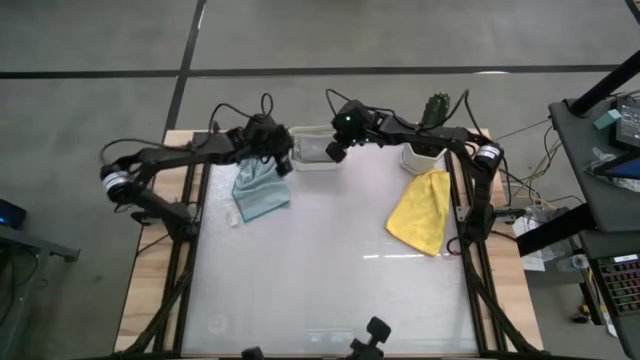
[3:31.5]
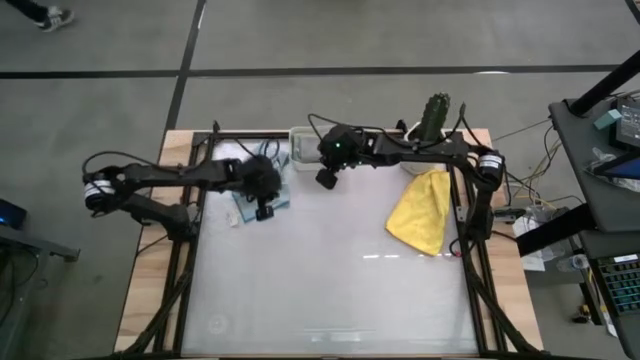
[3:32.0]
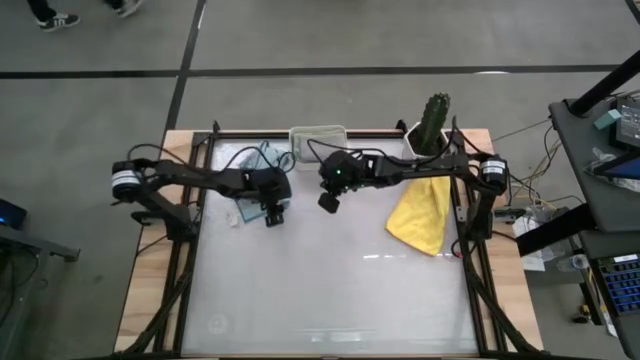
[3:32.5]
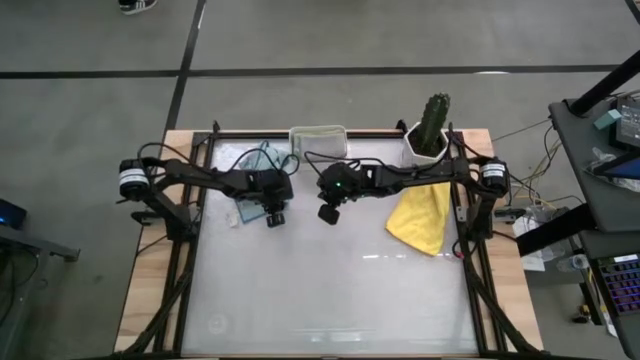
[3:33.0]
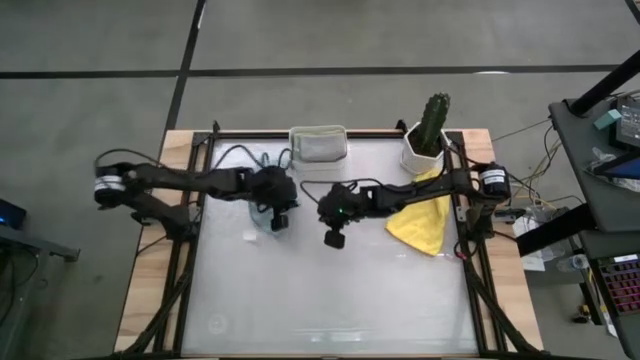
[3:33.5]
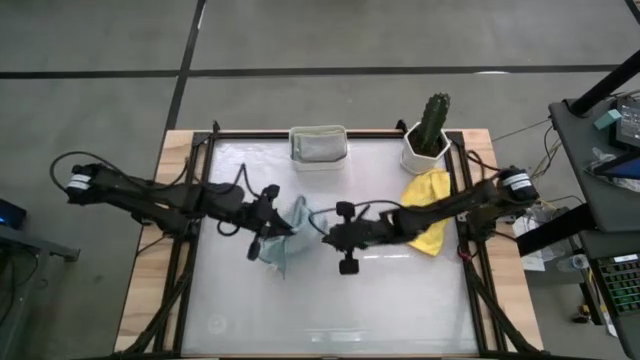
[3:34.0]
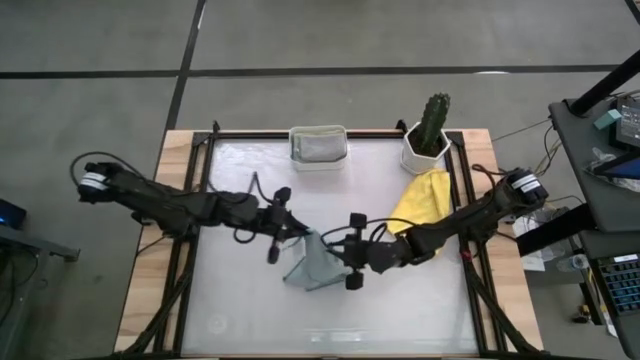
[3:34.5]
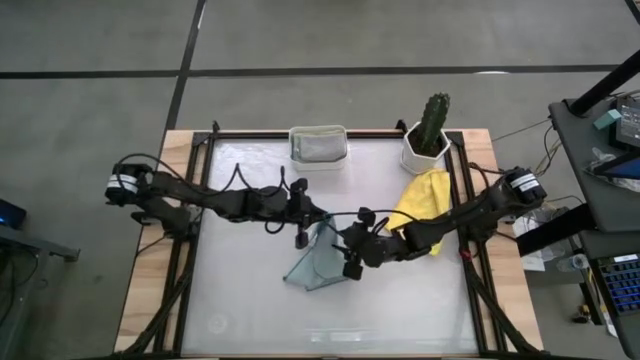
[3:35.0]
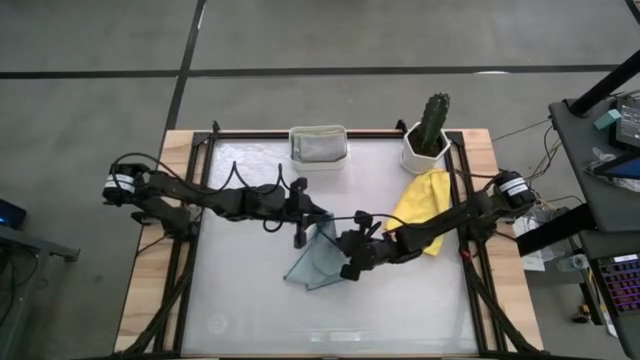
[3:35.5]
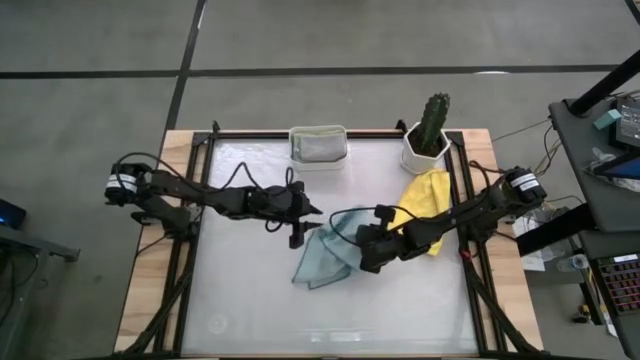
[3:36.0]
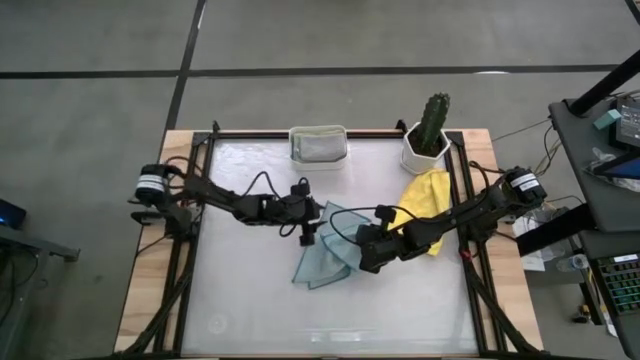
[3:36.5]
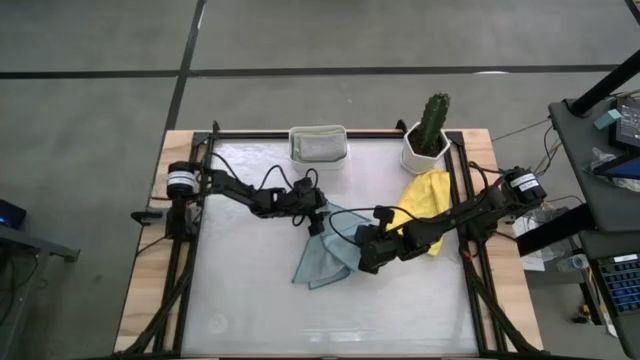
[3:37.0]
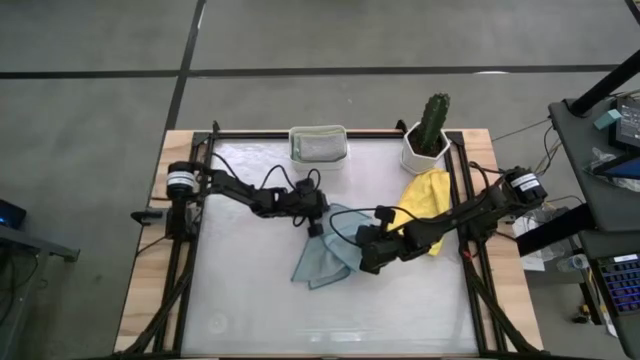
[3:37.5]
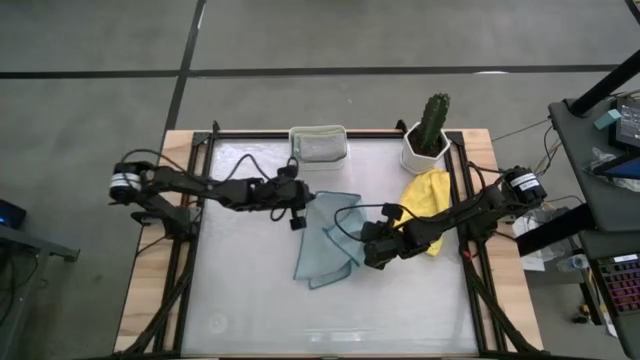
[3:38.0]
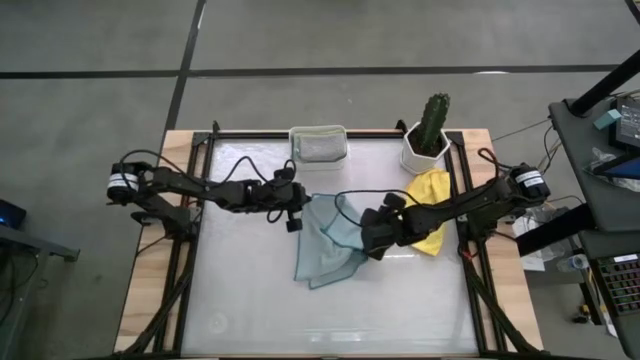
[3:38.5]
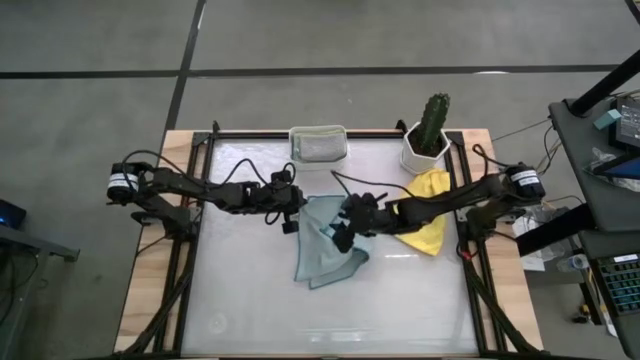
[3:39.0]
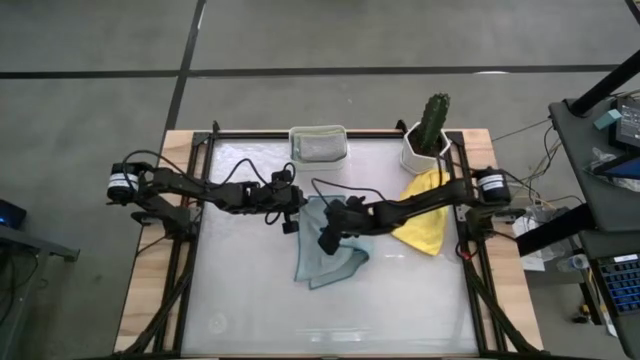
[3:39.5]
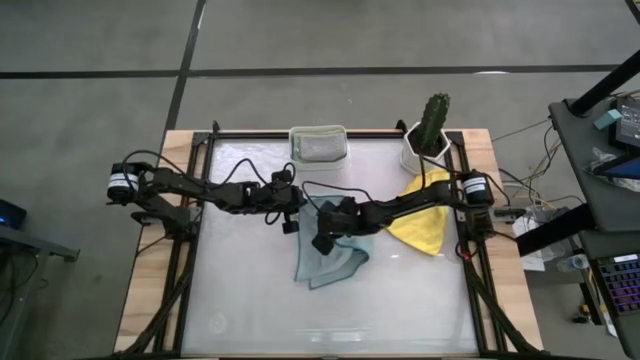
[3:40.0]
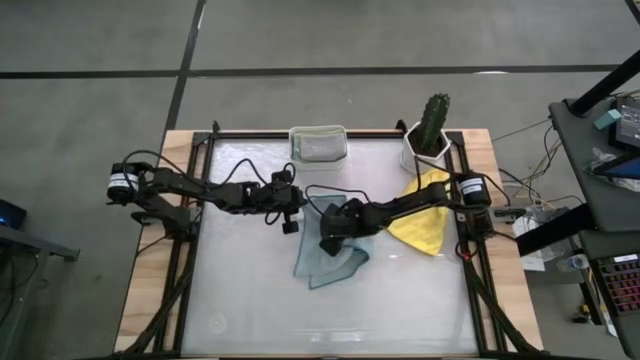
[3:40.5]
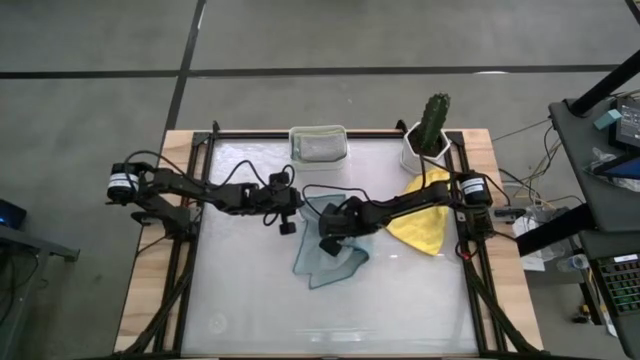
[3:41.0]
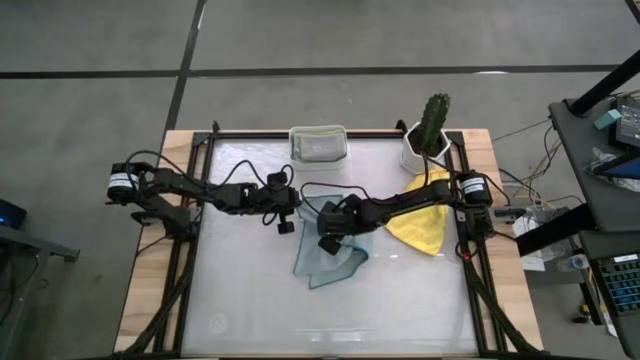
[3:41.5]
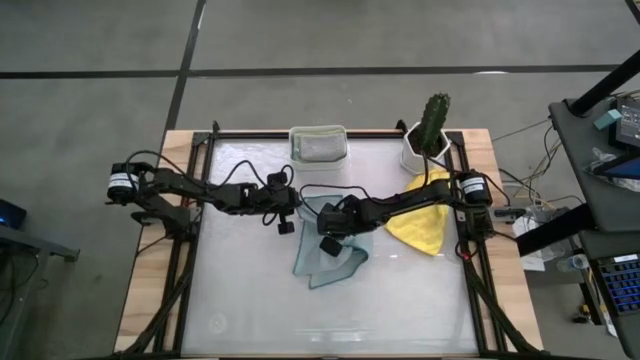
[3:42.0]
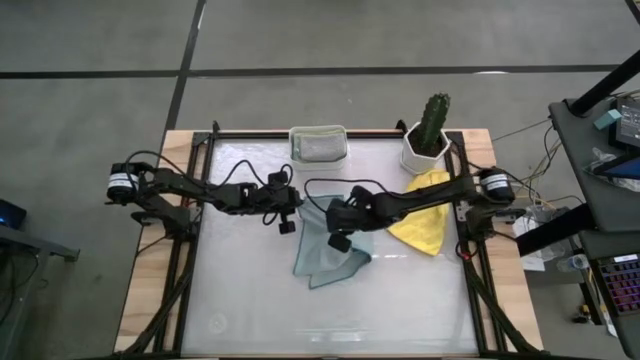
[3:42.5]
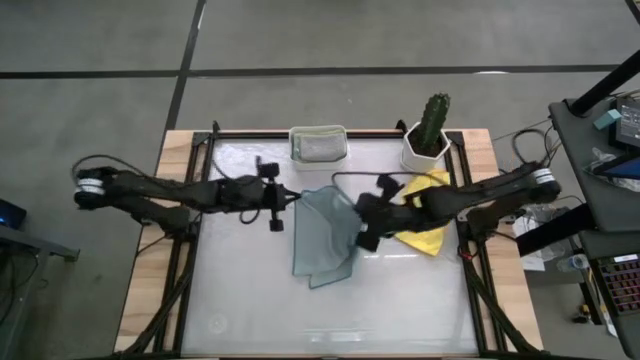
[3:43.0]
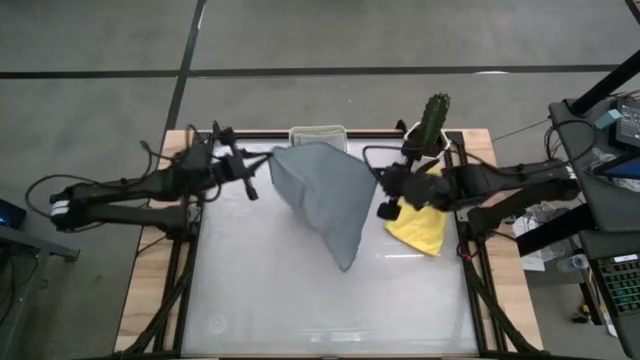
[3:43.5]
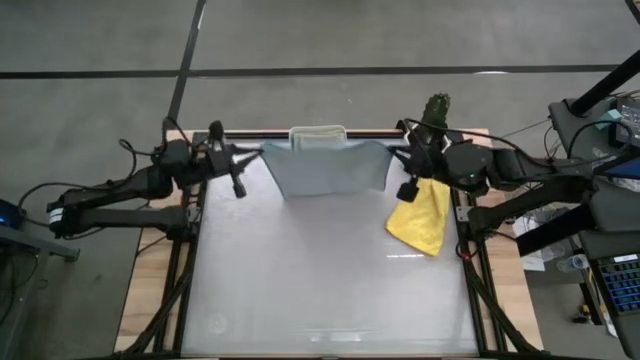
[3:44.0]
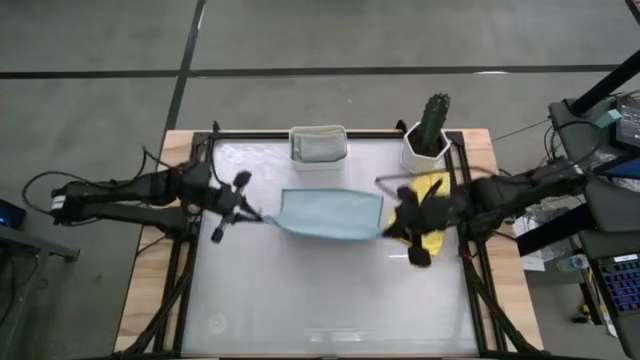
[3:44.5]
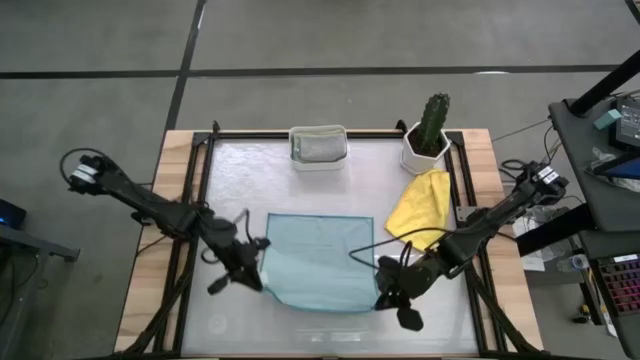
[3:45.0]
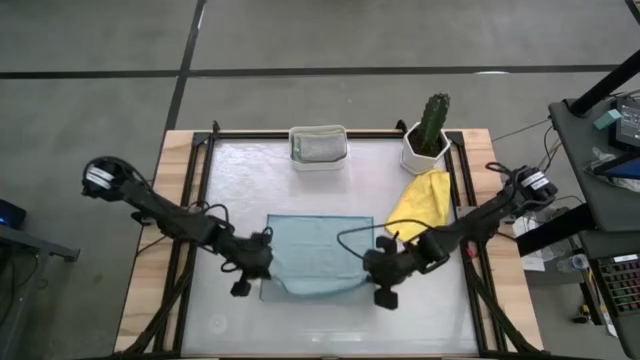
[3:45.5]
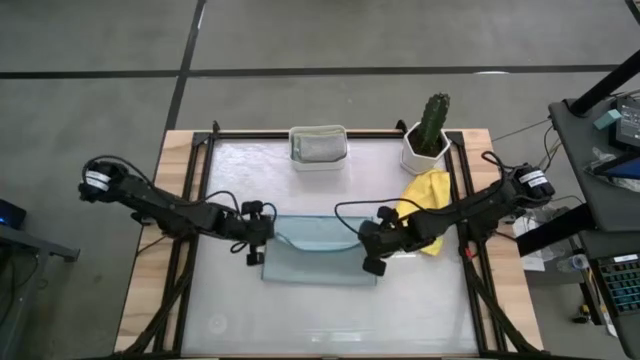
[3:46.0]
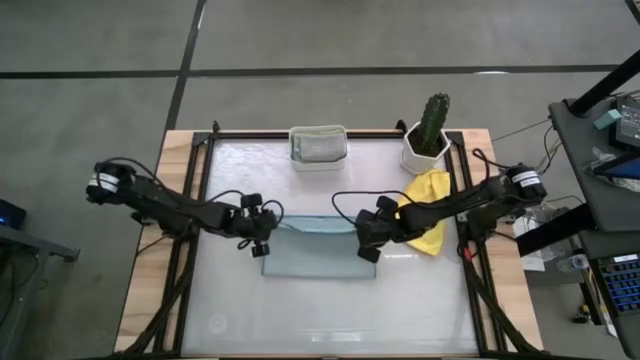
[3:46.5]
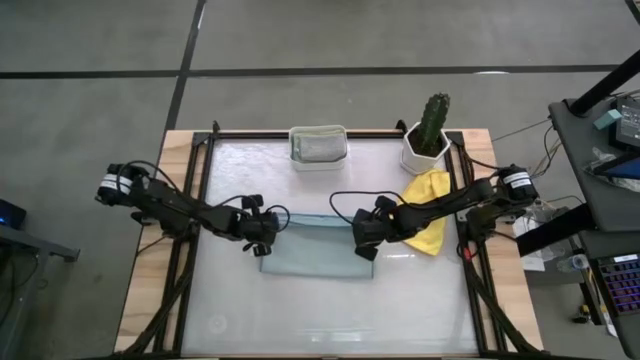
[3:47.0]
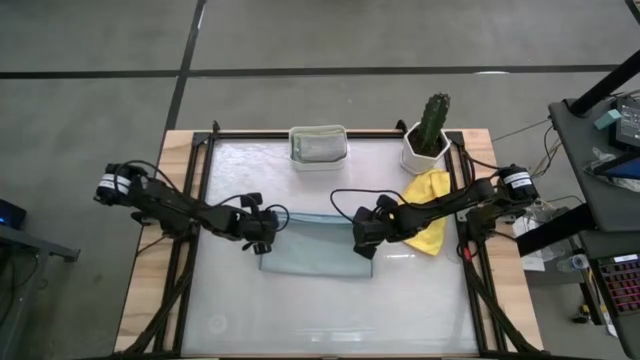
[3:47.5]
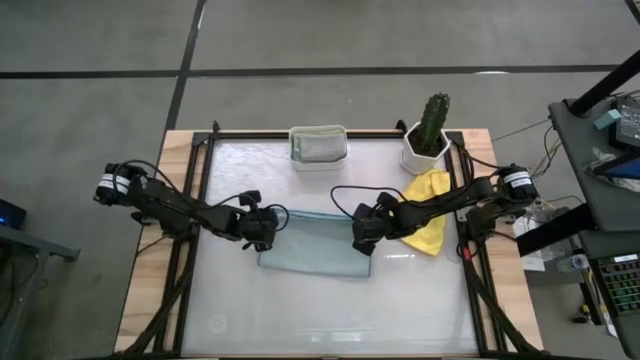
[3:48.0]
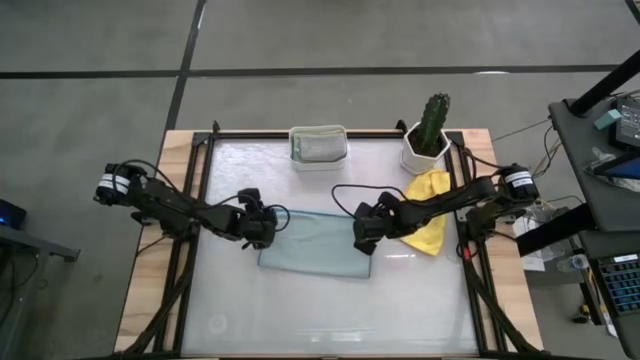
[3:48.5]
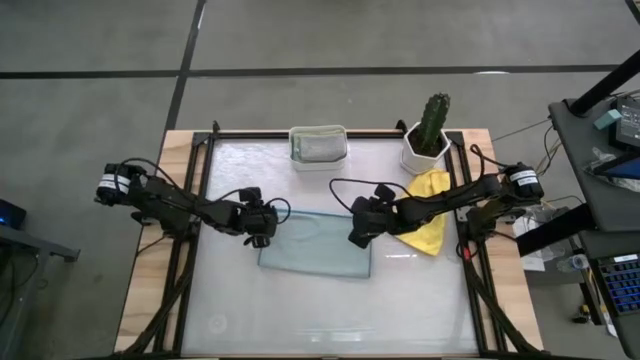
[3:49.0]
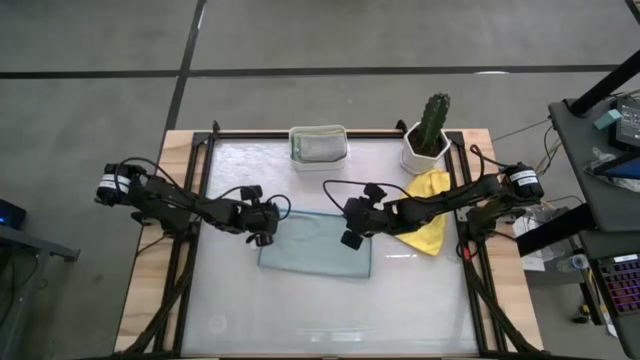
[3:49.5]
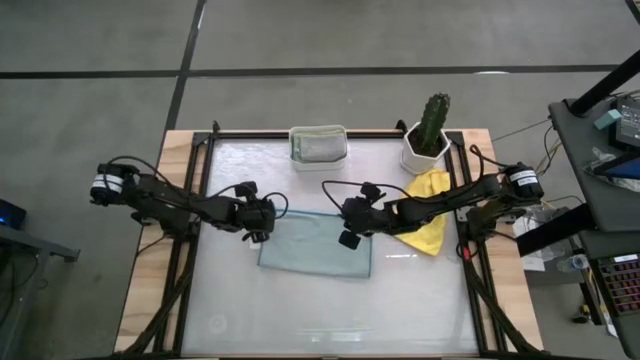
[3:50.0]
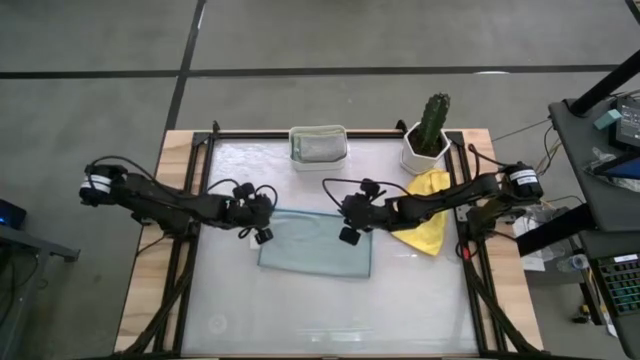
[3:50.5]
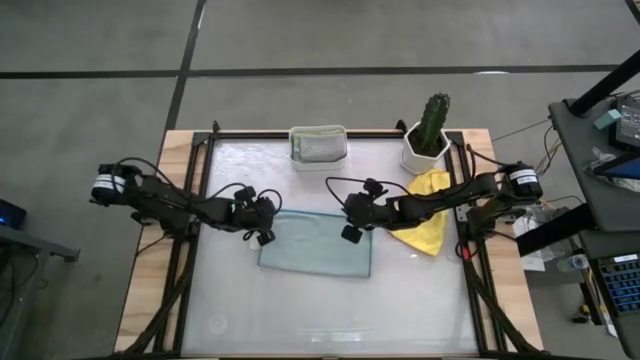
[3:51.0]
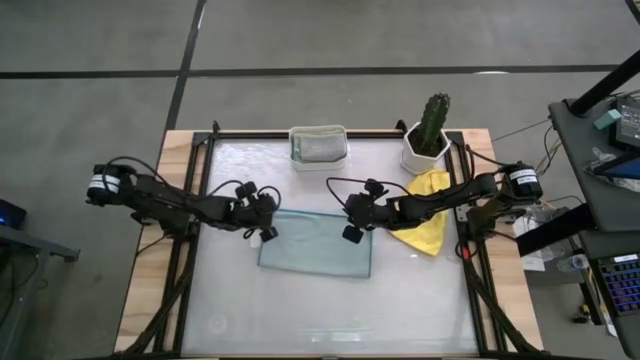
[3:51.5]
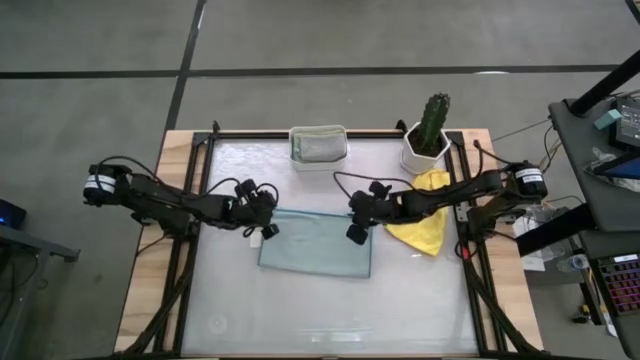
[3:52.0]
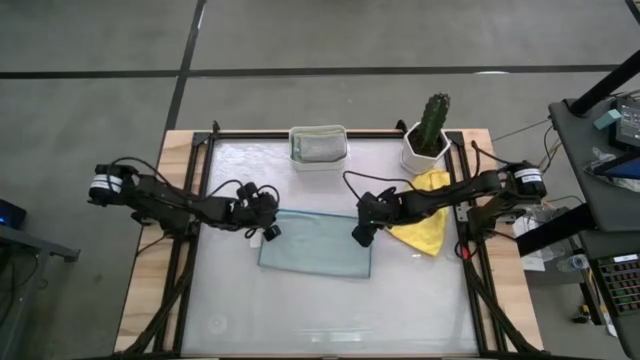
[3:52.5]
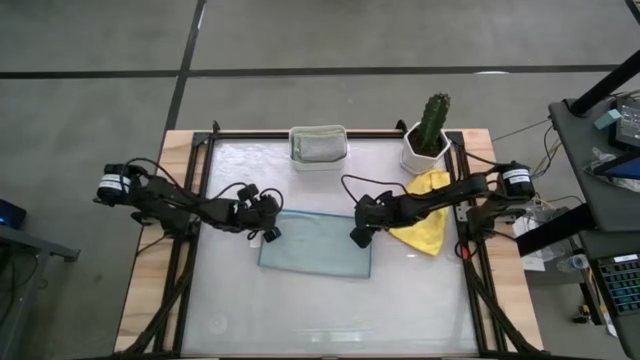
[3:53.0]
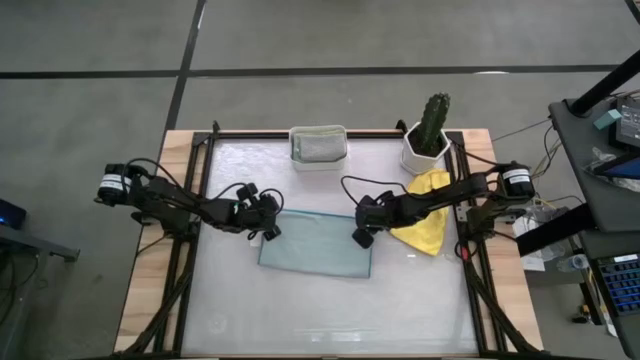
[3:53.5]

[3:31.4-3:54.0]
Task: Fold microfiber towels
Fold the light blue cloth
